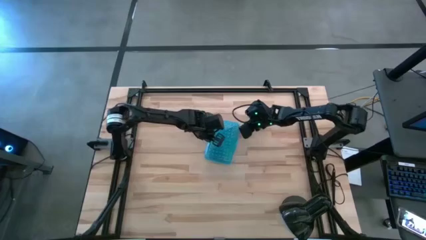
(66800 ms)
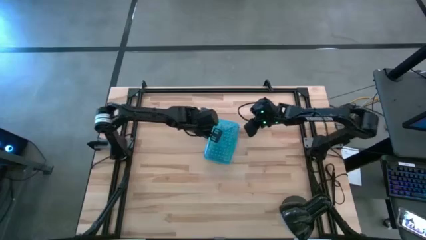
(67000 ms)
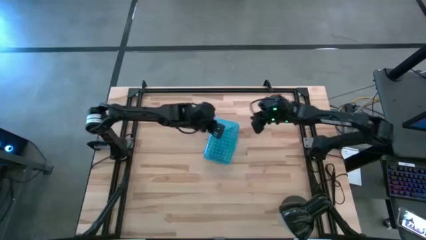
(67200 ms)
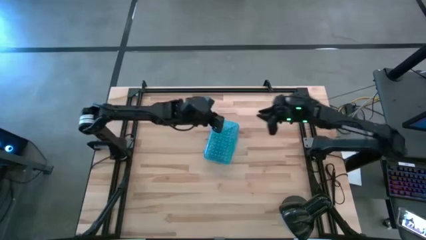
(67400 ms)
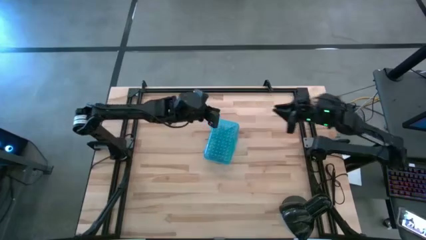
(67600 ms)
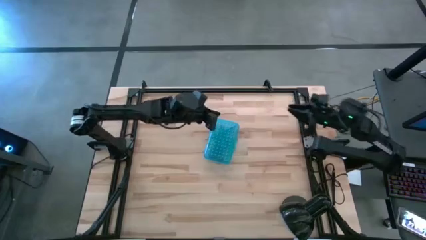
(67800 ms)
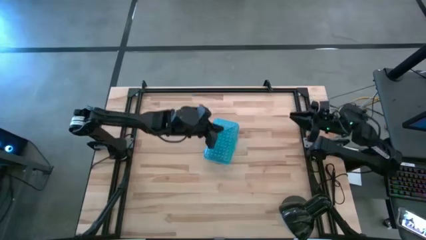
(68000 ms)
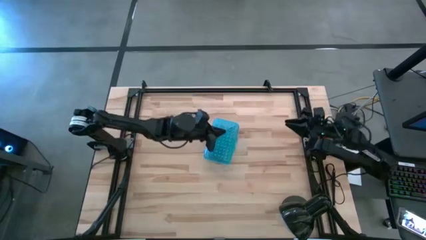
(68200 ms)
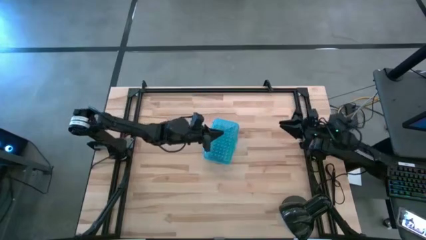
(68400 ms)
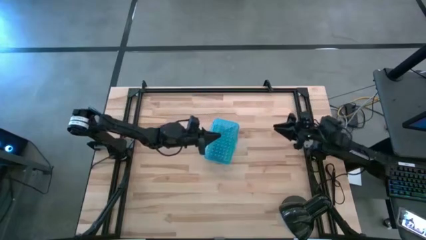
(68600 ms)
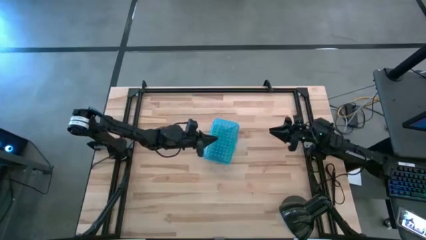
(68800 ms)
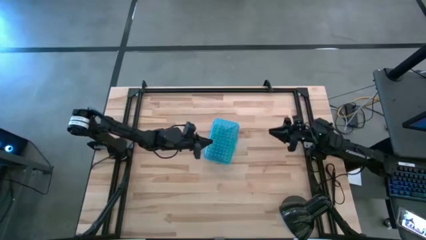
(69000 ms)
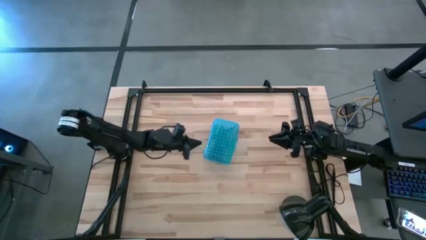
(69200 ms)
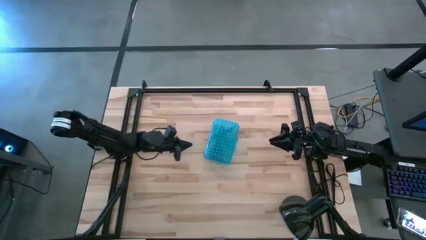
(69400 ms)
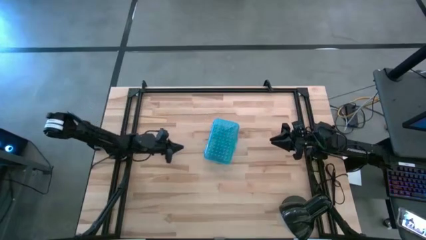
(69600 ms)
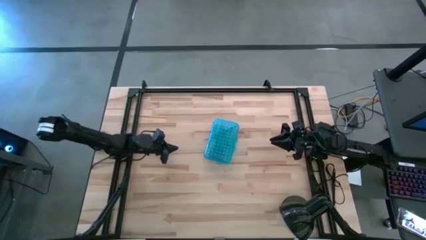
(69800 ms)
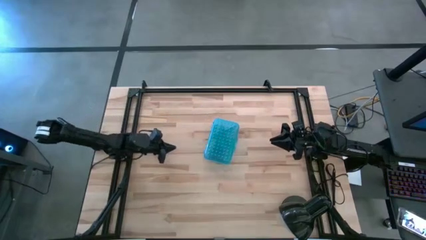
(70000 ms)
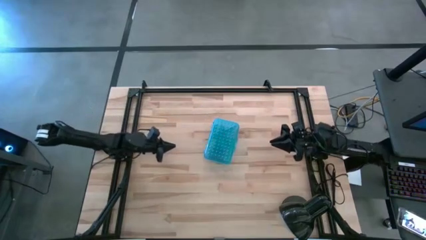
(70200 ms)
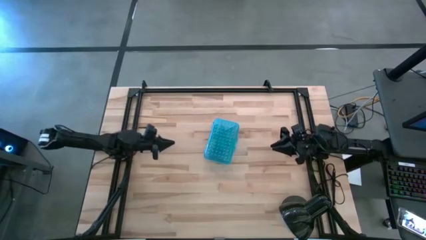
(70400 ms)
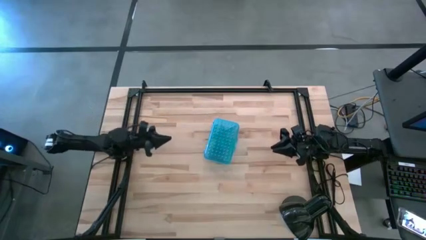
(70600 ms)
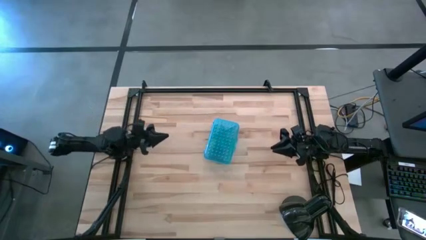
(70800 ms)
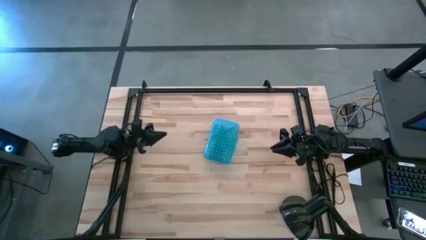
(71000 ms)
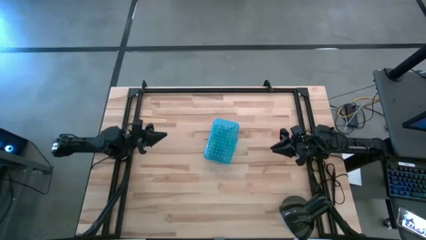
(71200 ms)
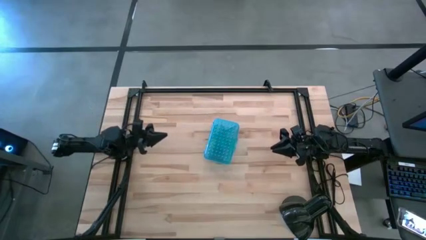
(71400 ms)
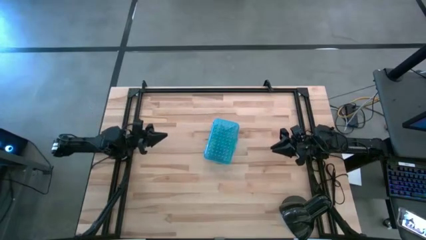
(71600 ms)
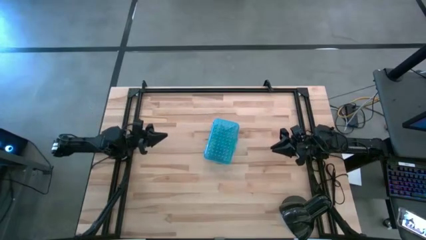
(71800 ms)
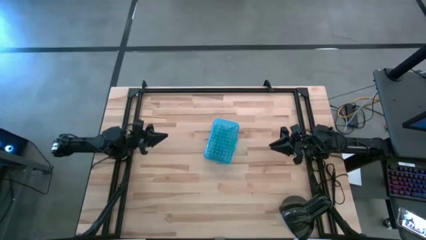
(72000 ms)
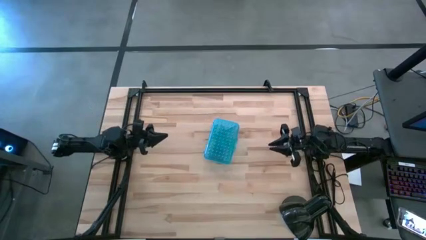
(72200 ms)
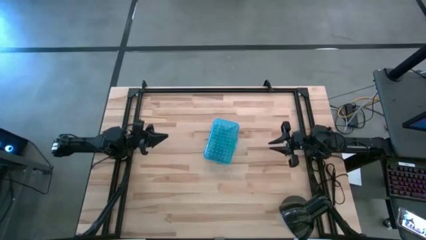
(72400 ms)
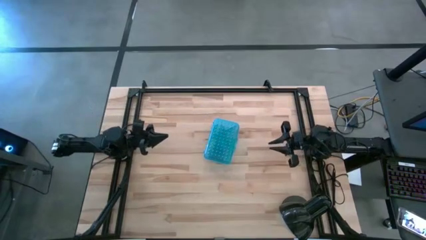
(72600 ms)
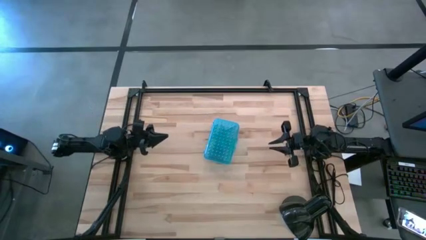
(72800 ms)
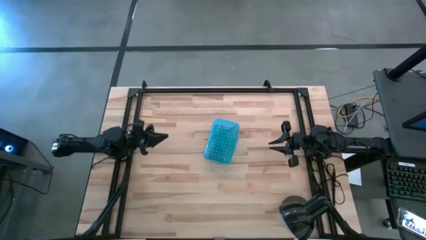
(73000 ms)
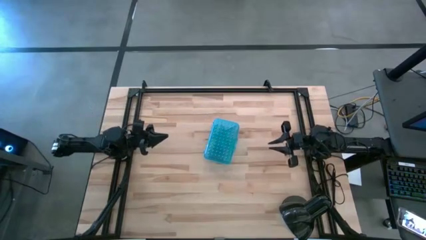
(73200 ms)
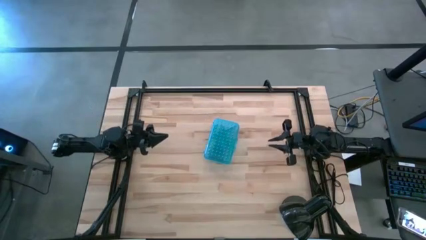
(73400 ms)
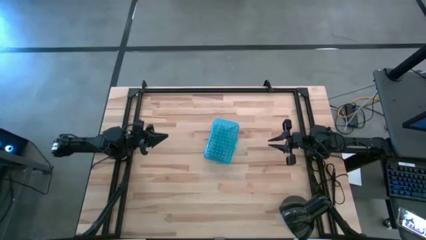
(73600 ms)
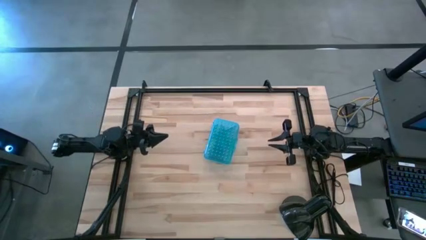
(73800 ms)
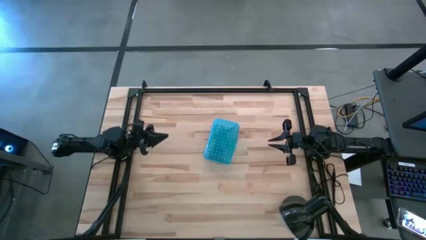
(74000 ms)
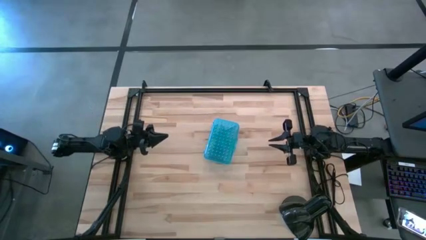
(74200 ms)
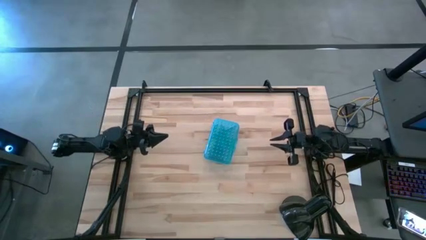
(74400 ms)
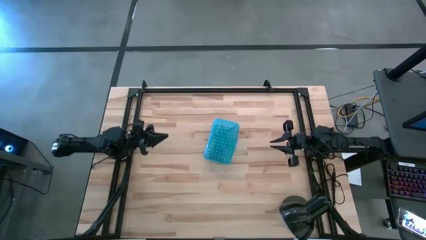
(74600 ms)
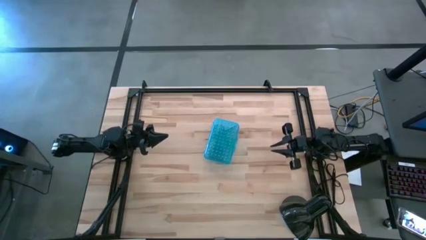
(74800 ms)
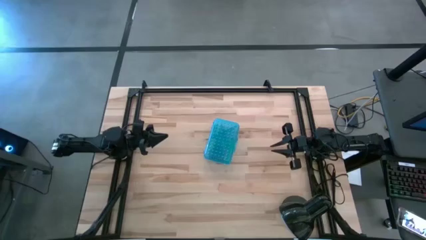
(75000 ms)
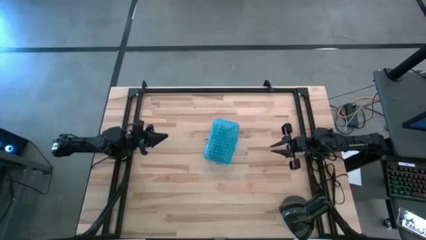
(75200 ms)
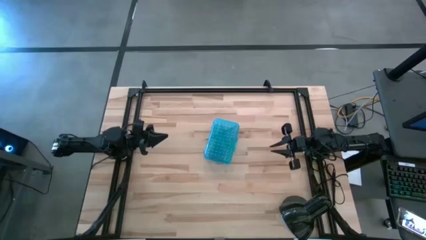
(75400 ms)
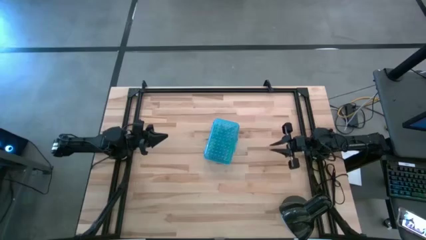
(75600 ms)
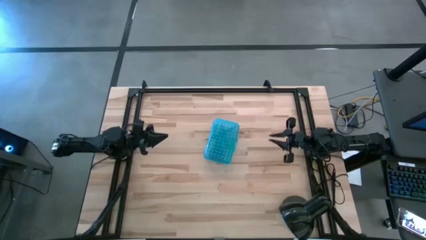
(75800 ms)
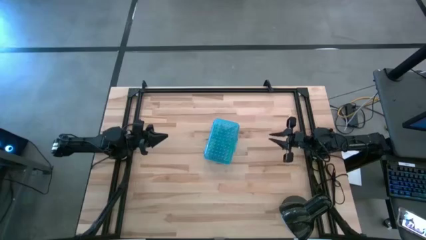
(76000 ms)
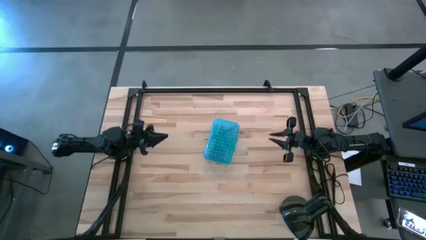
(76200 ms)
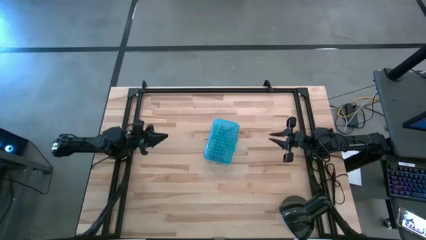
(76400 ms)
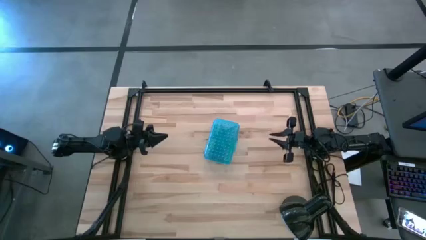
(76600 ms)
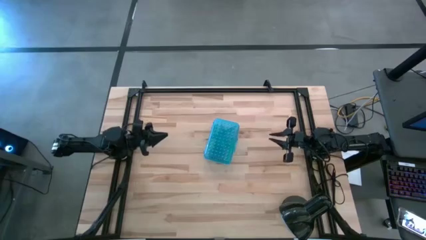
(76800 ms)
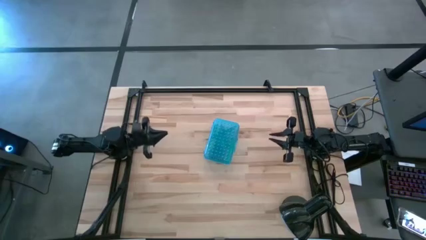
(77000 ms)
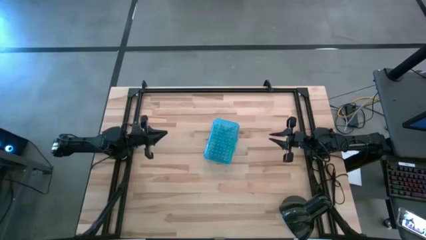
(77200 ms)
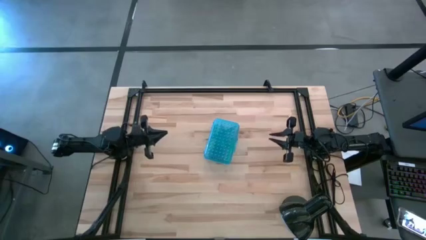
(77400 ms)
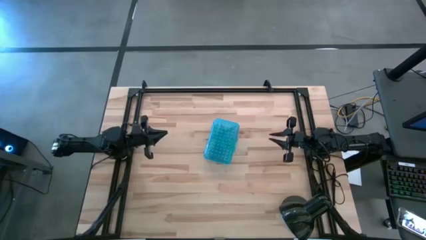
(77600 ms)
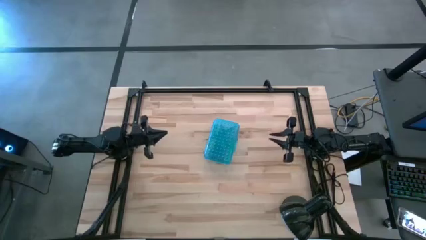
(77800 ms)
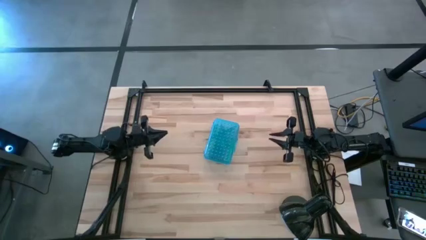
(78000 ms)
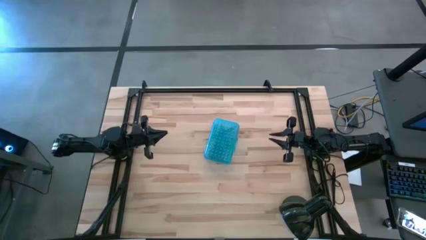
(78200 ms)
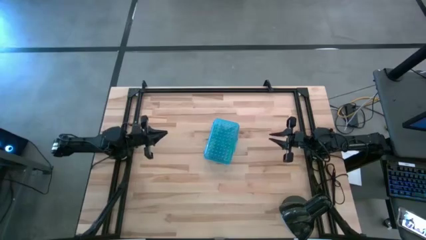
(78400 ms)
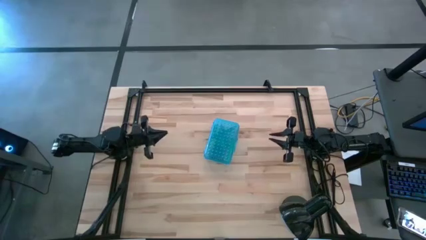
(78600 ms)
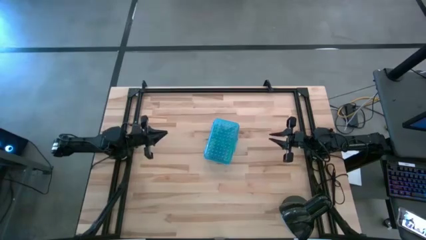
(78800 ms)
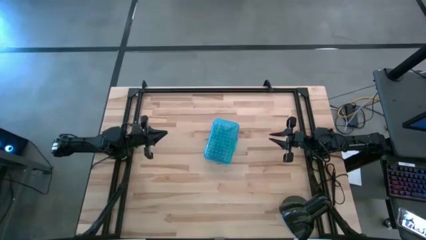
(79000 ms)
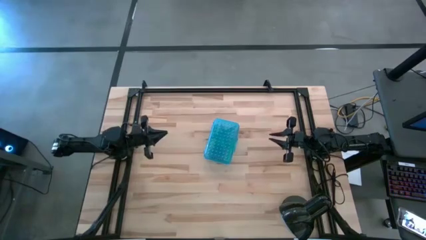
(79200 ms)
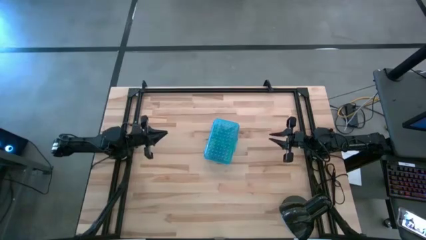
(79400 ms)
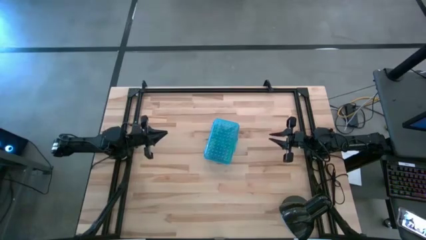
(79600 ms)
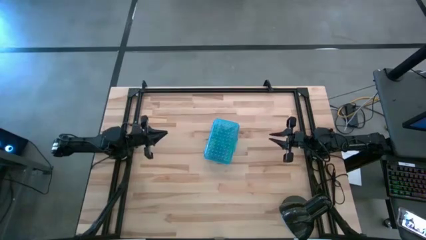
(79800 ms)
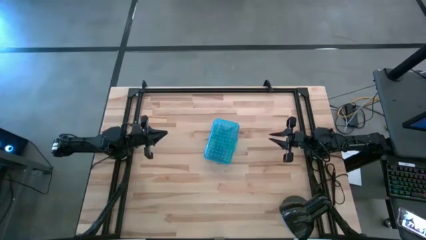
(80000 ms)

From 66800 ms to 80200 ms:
Task: Pick & place school supplies into a supply box
Return To Home Position

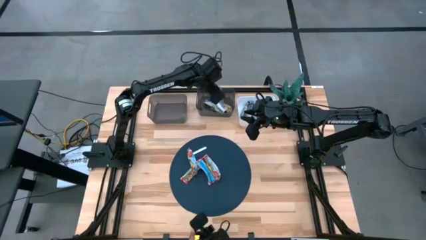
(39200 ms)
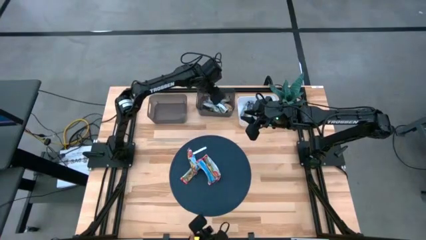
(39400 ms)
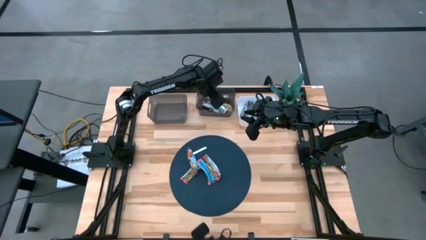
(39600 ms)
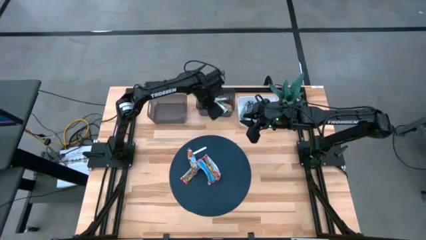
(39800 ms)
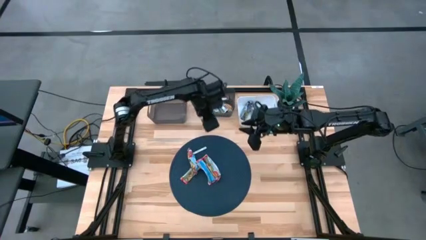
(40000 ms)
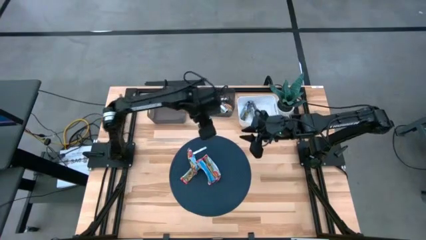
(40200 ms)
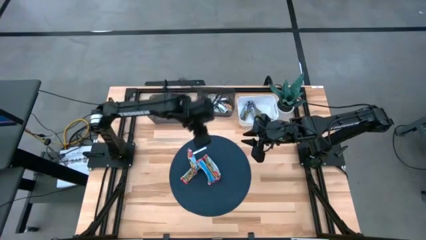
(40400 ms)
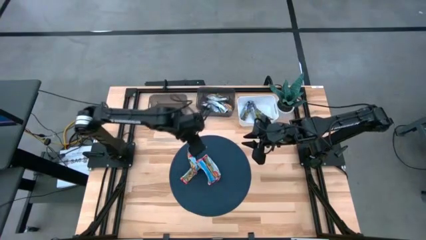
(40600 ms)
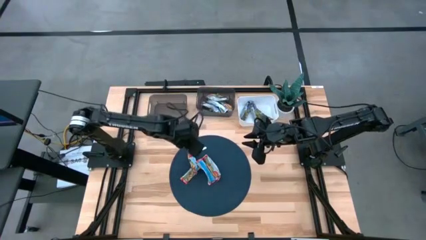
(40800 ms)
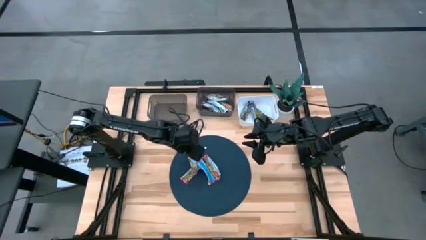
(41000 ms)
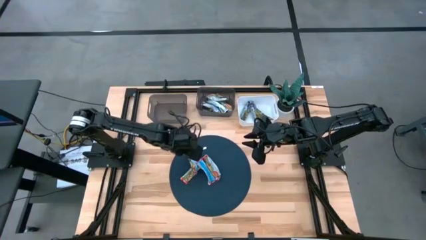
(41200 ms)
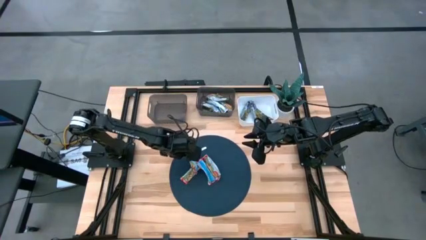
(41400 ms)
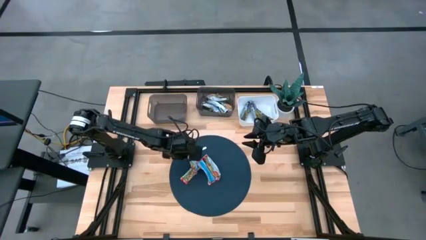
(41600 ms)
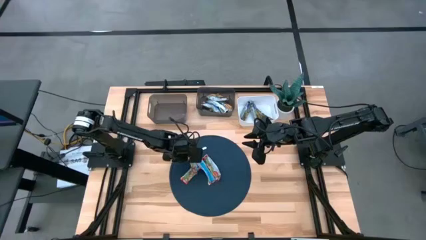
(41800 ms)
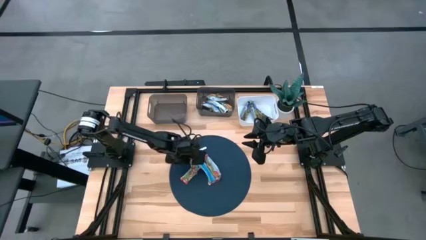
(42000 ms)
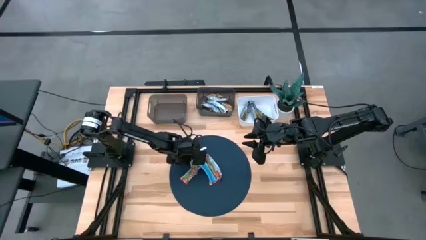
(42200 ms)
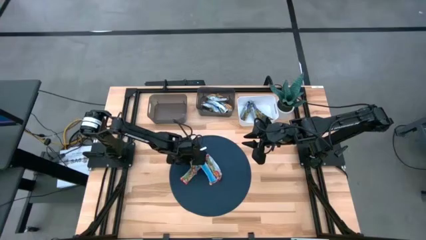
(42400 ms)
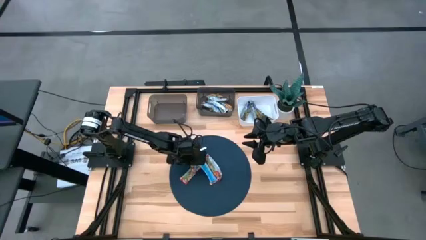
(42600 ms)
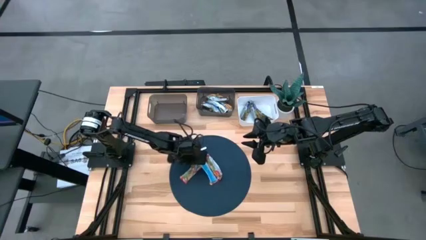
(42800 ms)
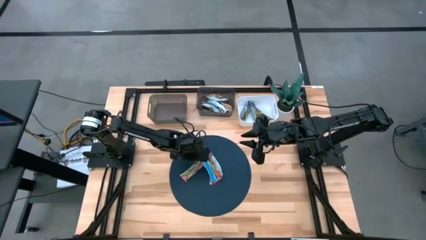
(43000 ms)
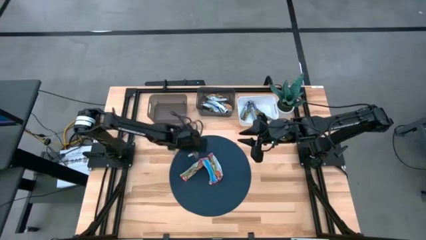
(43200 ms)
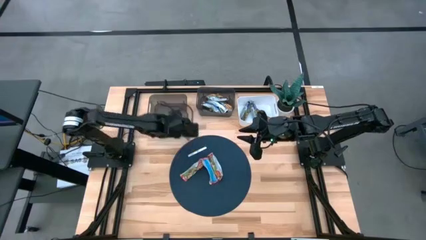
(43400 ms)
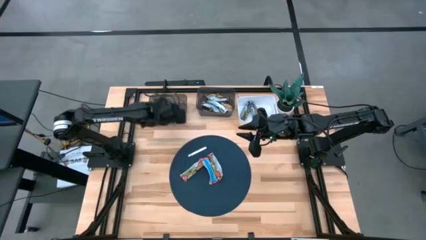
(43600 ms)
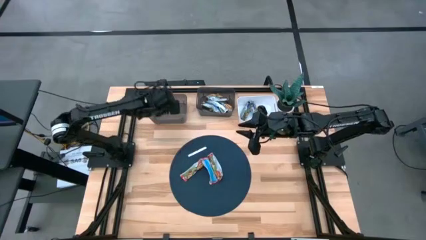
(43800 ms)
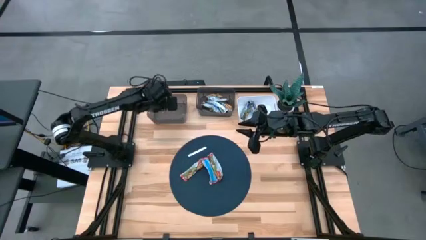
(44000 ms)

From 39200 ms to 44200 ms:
Task: Pick and place Granola Bars by type
Put the red granola bar into the left black bin
